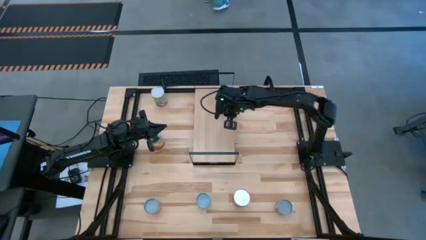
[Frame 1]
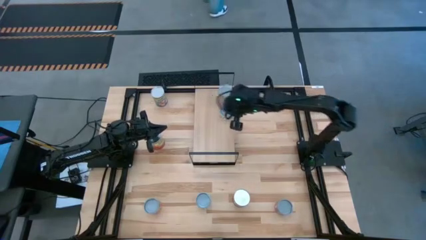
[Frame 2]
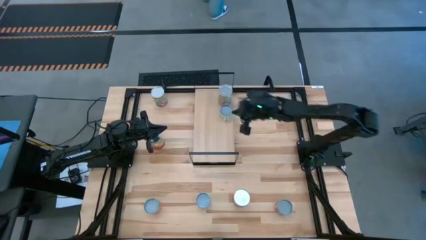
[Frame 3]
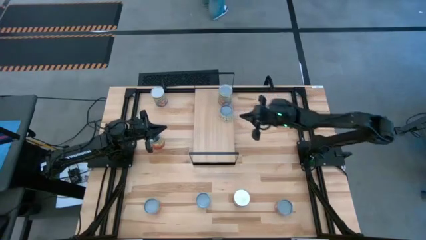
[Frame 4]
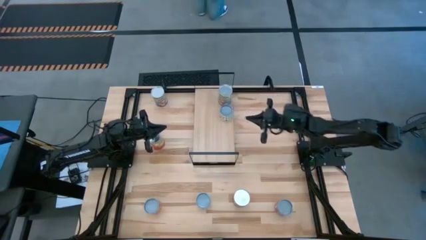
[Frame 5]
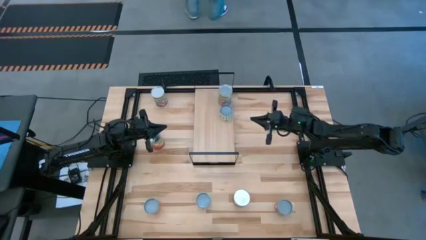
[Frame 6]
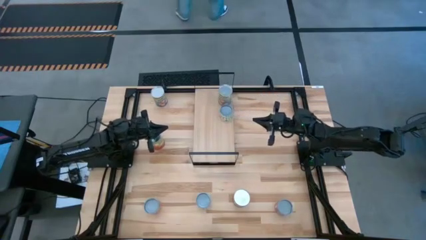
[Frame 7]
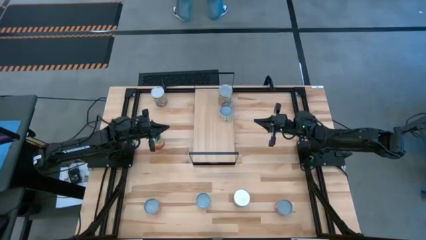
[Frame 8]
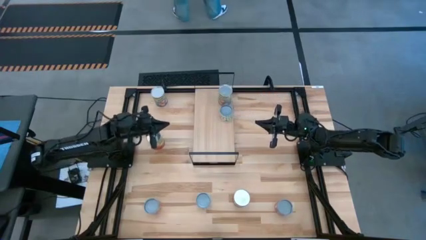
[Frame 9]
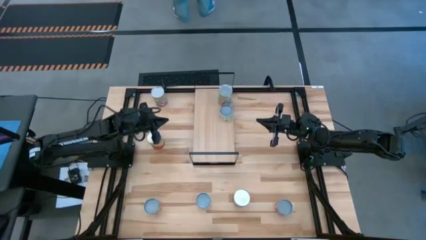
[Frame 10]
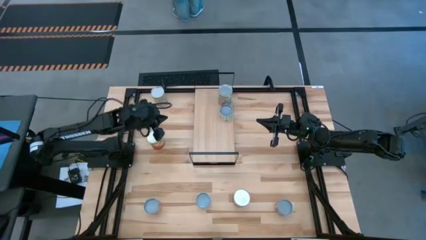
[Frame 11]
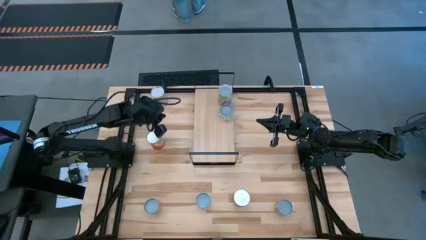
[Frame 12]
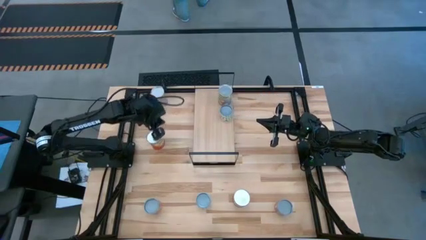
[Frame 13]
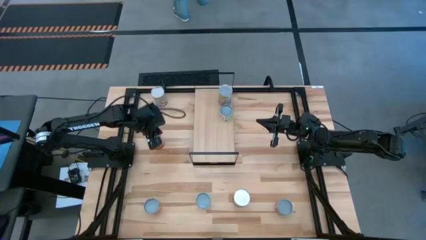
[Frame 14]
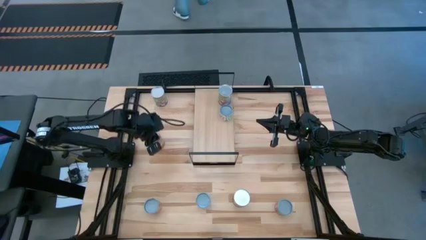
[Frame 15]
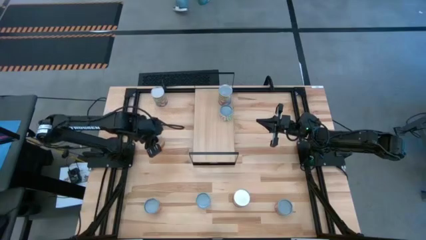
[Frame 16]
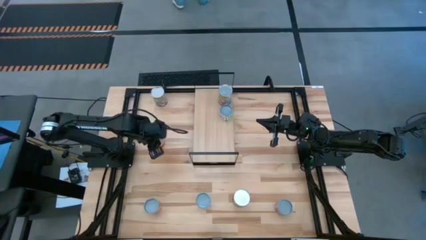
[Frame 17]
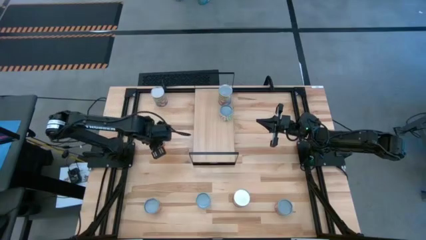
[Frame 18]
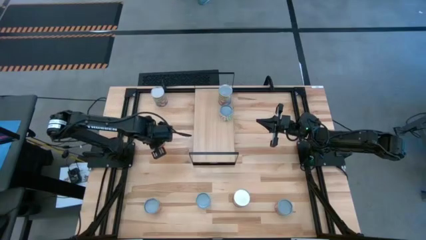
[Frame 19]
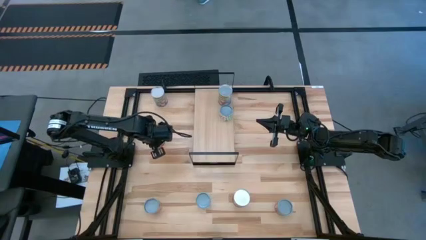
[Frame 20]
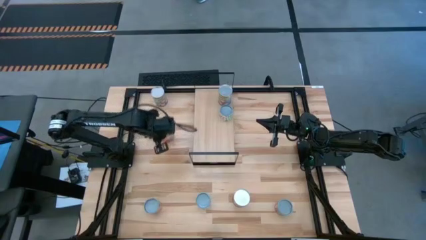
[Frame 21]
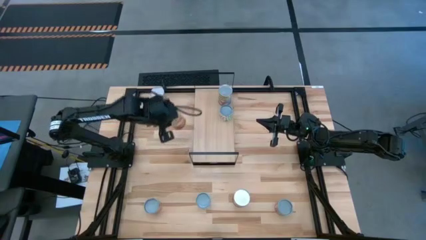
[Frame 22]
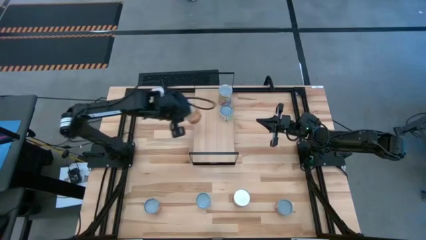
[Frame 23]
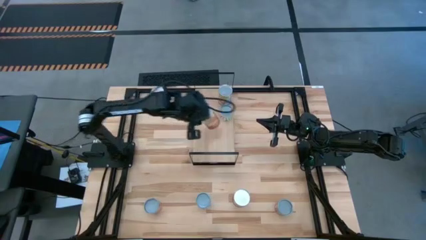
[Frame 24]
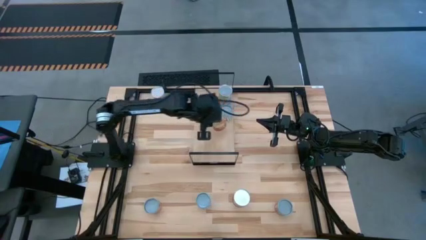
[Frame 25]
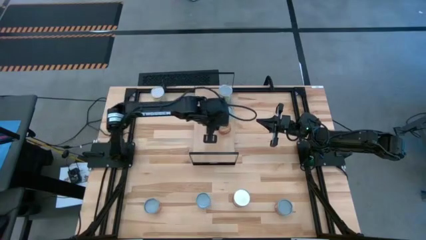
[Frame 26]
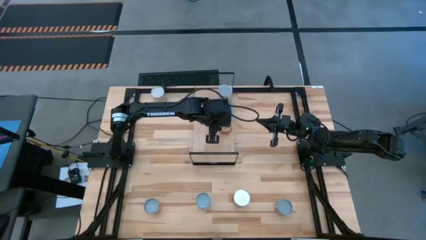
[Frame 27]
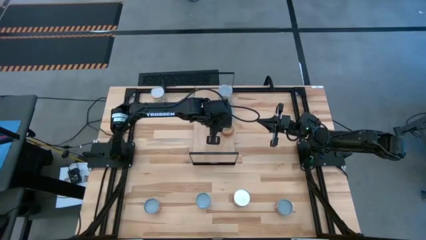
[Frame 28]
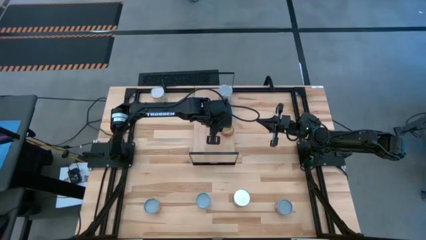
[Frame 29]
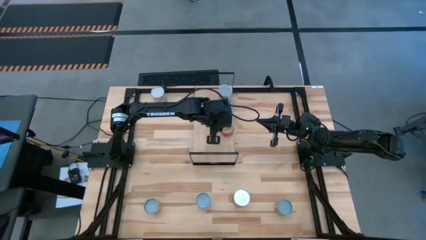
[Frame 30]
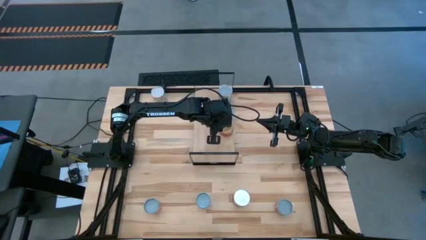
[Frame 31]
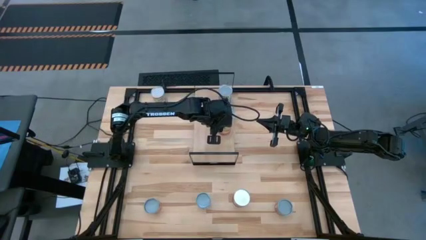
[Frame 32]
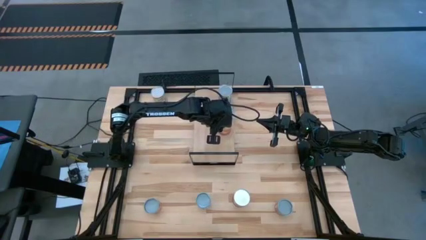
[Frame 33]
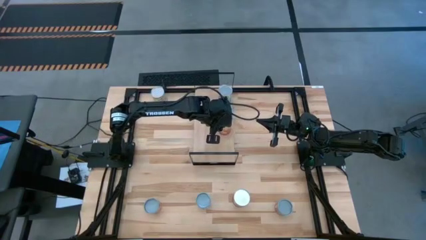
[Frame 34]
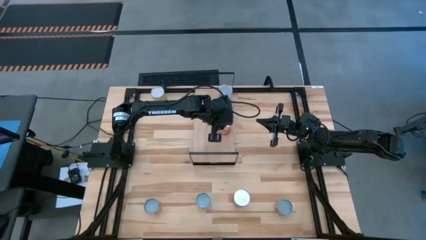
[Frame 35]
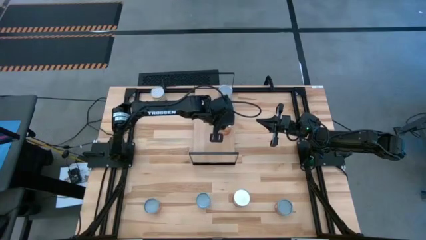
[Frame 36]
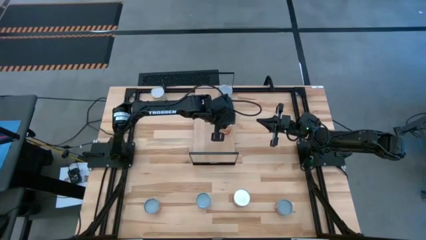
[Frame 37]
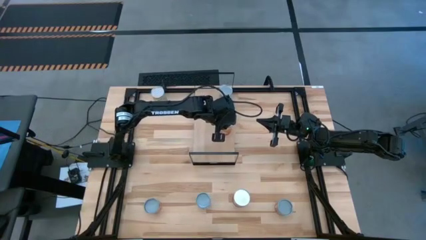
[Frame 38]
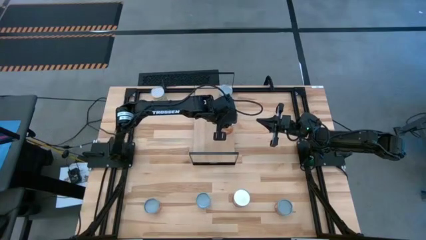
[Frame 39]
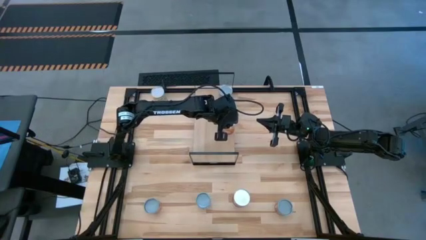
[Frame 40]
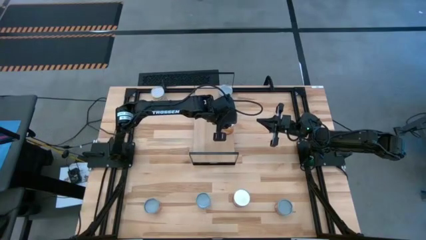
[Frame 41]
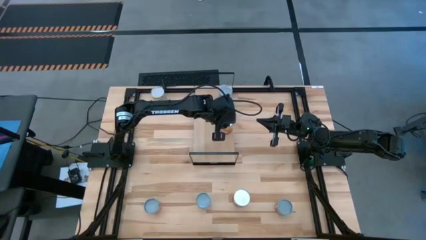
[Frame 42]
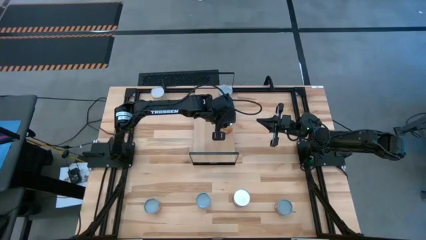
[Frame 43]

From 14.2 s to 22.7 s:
Task: Pick and place cans onto a shelf
Put the top canned corn on the shelf

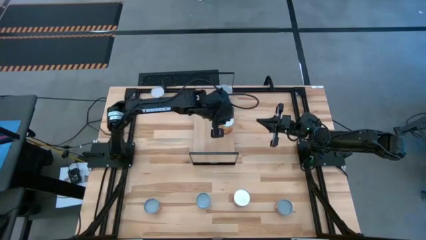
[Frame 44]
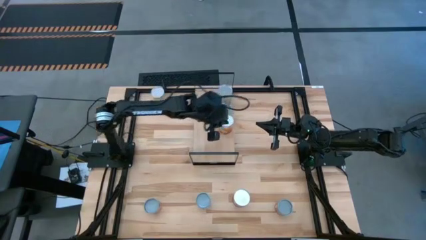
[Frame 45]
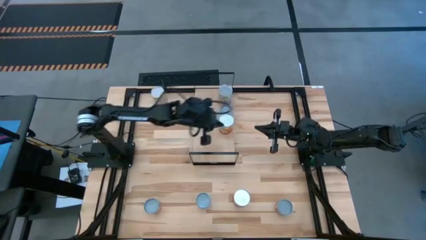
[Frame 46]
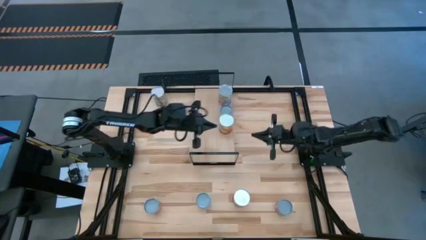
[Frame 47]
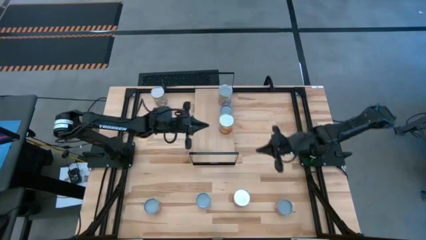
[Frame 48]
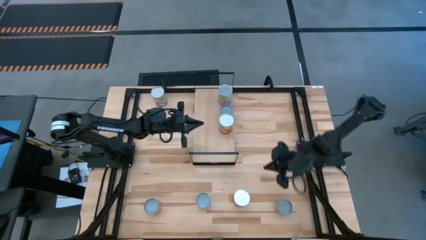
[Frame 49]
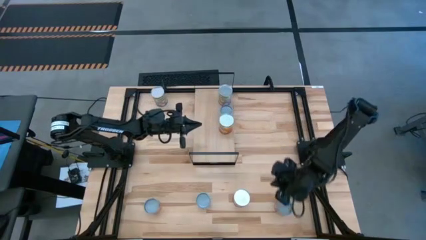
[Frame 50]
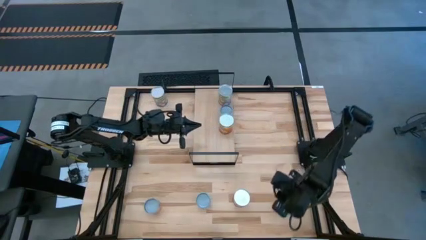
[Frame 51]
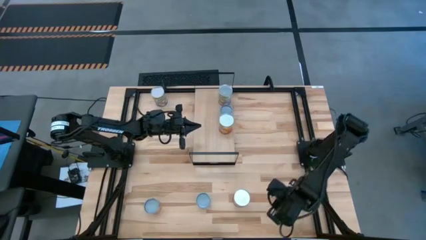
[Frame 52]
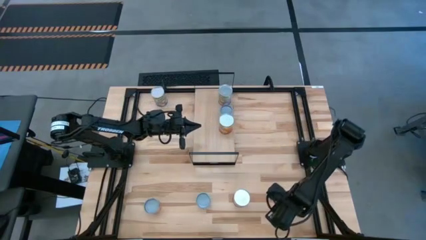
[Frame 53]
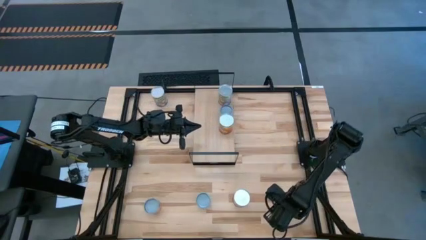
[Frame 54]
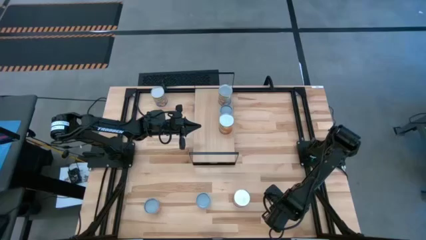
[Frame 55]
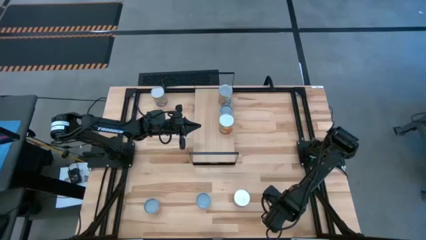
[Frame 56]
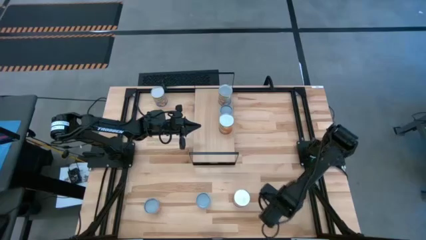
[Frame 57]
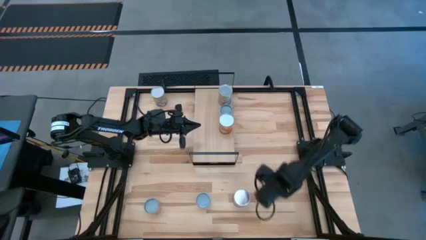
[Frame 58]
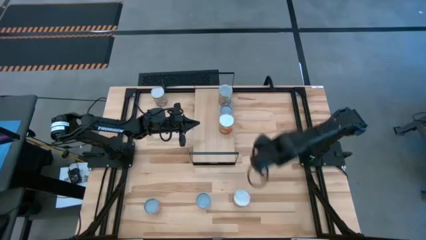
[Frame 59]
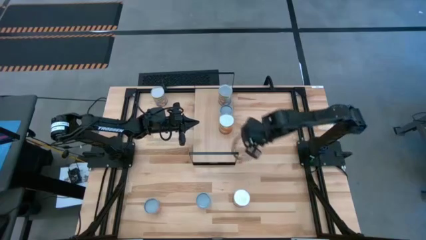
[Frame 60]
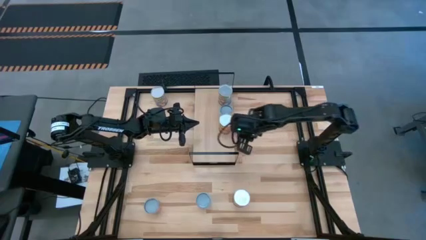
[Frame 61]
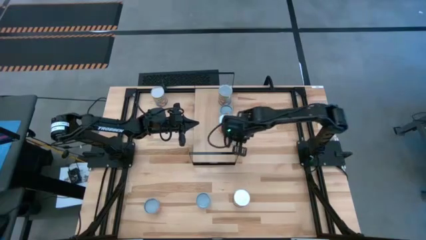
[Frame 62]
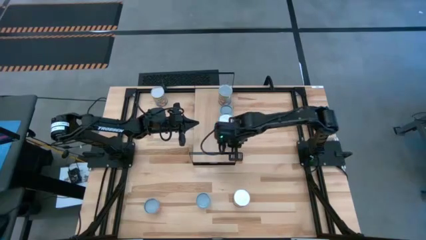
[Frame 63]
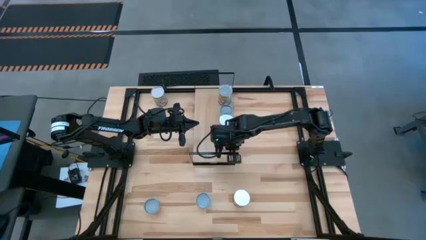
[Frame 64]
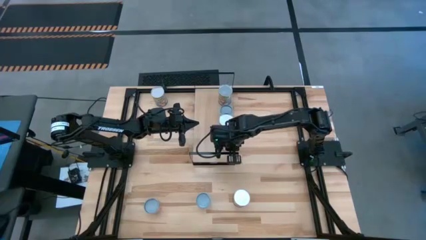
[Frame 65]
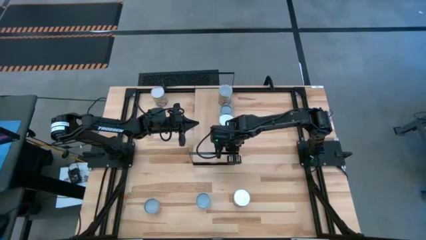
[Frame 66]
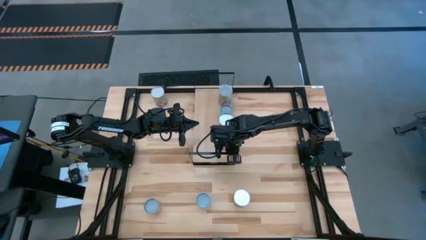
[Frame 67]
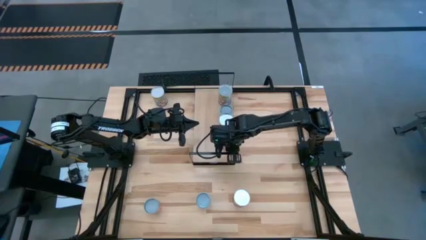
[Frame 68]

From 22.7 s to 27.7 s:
Put the canned mixed vegetables on the shelf

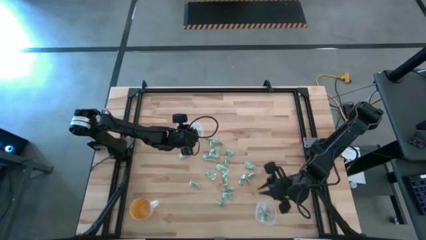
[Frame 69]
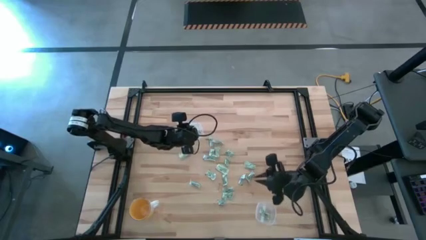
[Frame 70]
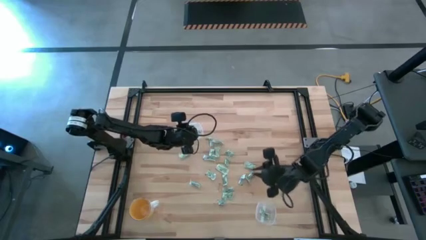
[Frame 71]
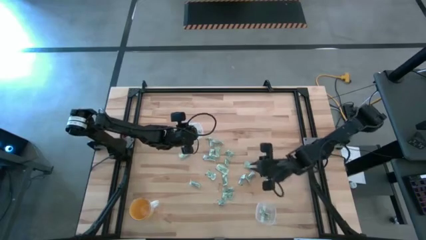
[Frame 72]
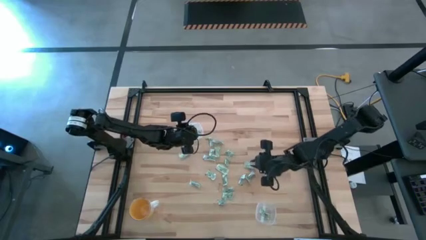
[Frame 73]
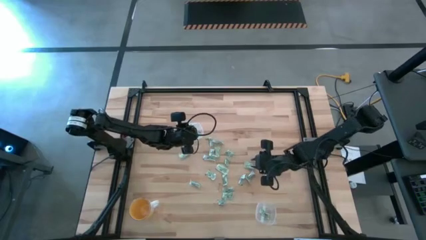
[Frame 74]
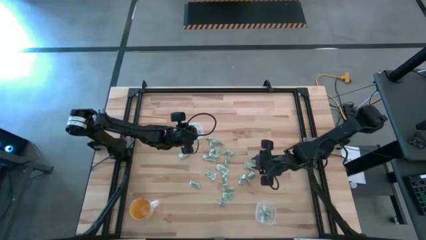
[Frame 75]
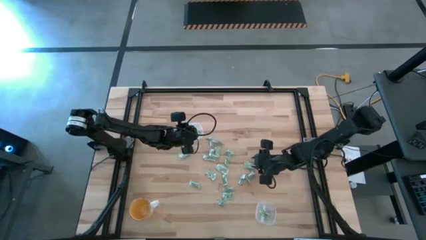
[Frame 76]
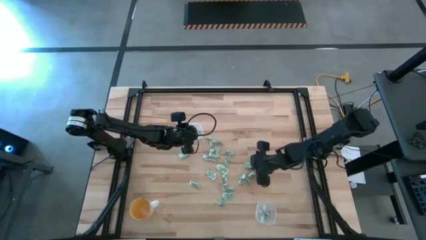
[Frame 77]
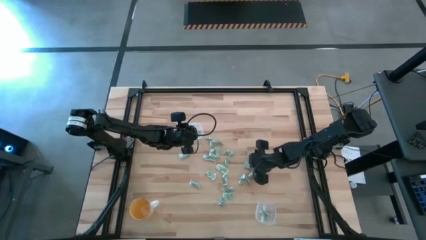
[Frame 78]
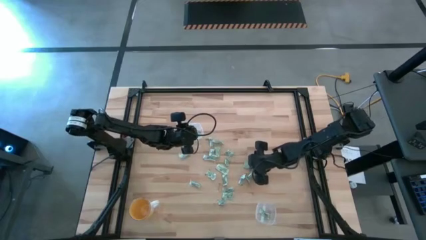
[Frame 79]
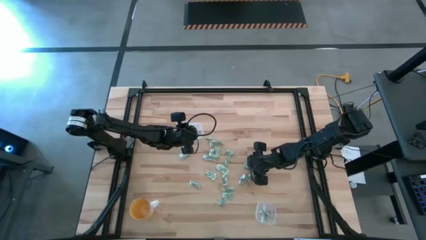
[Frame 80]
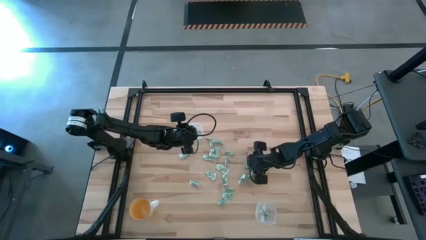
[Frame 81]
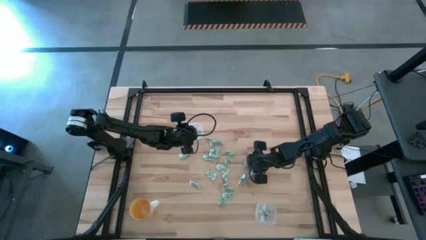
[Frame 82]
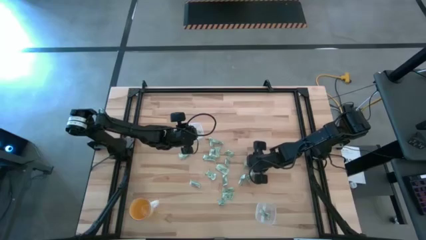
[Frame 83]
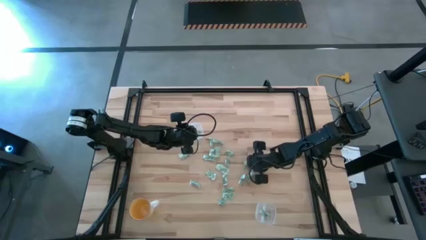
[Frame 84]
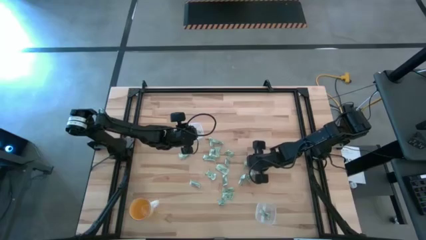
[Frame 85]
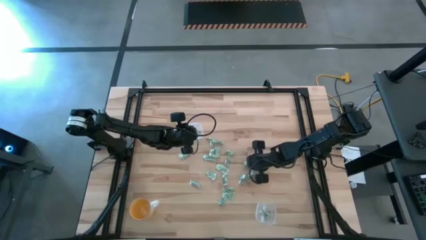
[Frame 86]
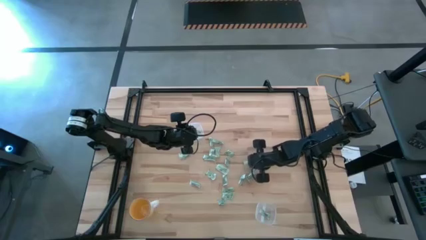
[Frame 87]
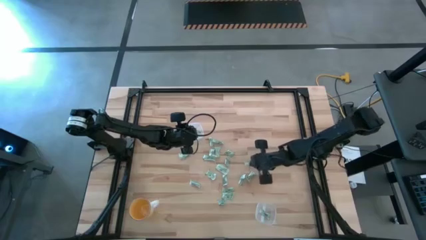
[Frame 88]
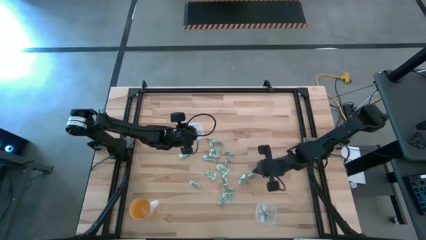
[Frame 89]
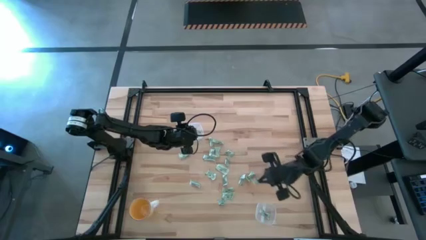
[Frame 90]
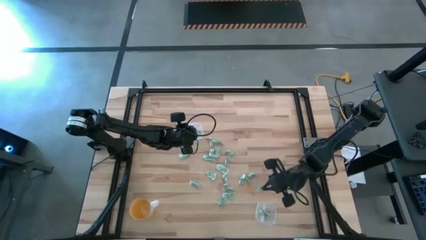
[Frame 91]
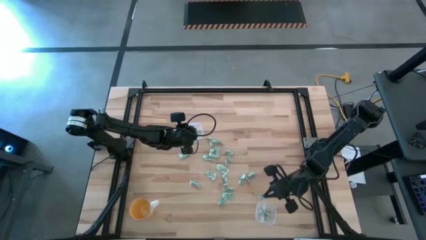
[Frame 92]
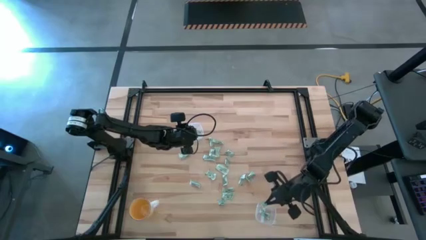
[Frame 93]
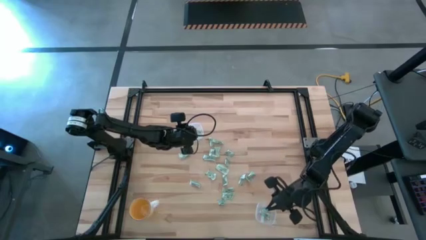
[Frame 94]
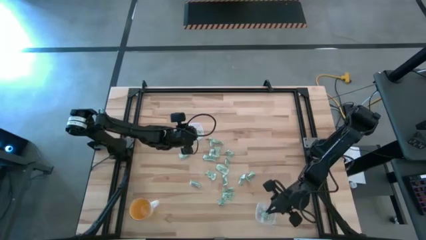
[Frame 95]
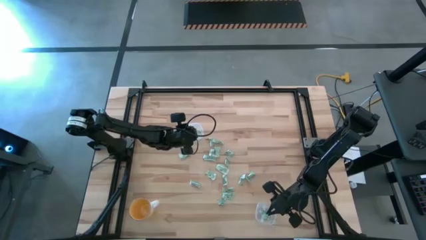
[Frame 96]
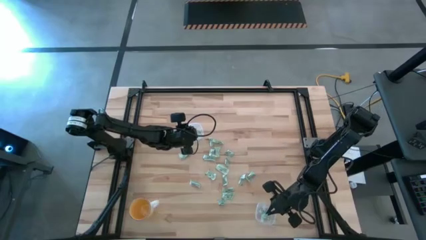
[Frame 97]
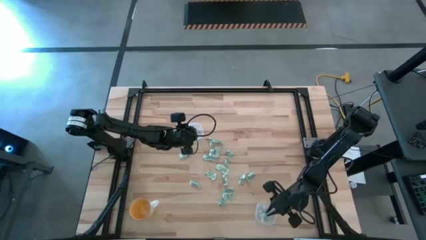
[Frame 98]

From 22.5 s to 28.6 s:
Task: Pick and place Stevia / Truvia into bins
Put the stevia packet into the bottom transparent container
